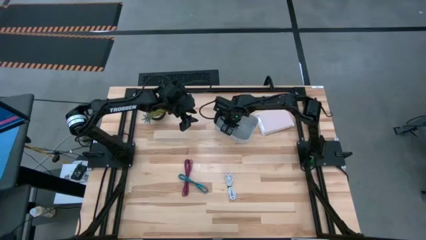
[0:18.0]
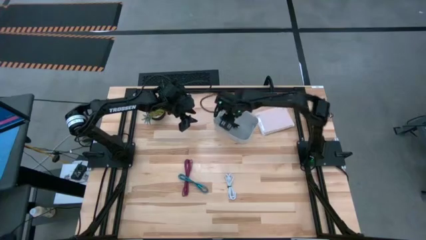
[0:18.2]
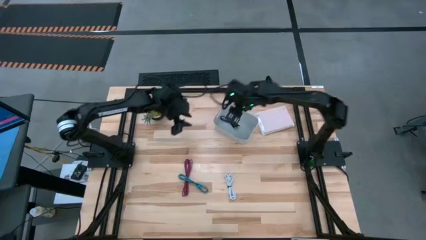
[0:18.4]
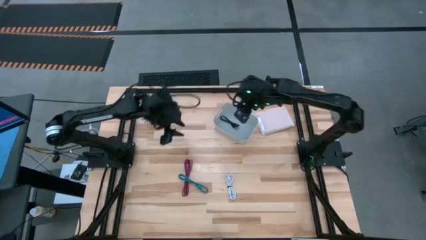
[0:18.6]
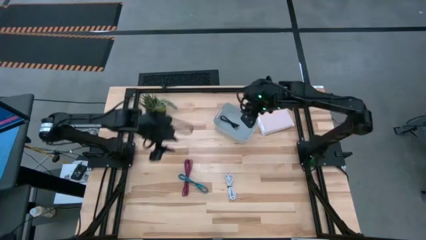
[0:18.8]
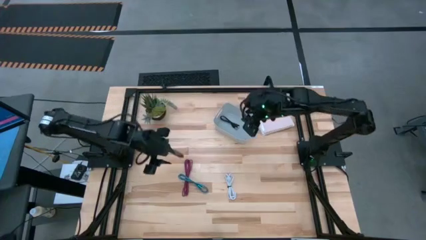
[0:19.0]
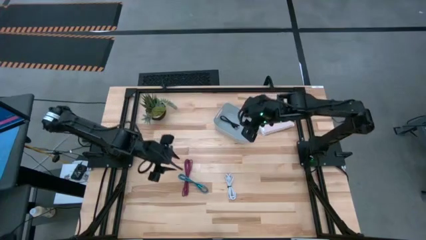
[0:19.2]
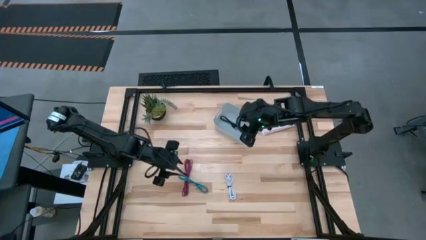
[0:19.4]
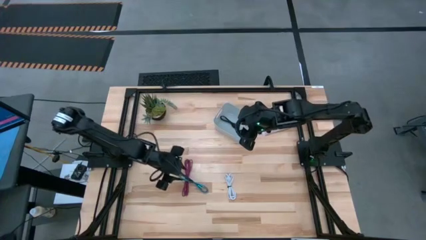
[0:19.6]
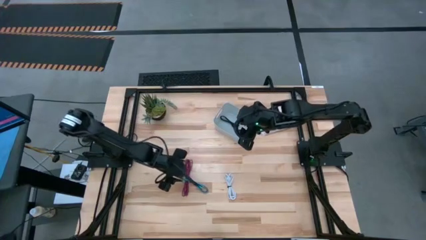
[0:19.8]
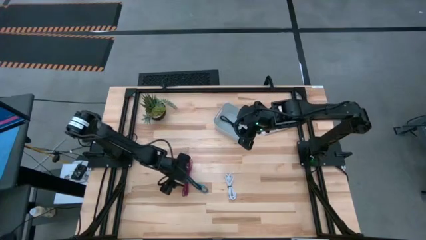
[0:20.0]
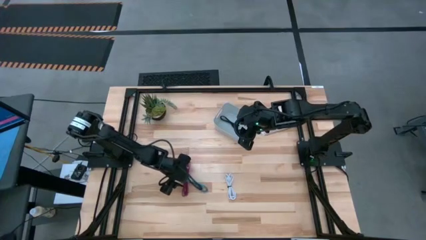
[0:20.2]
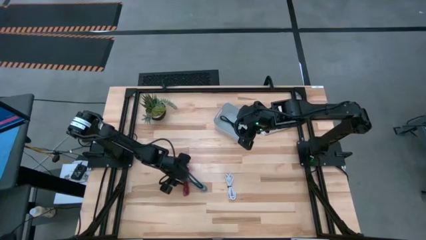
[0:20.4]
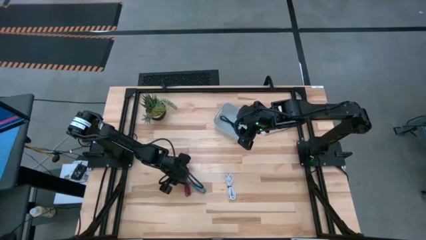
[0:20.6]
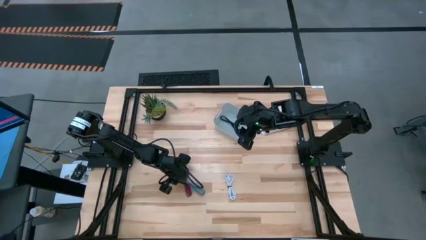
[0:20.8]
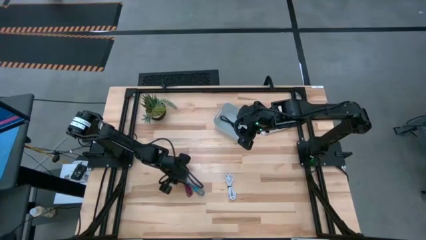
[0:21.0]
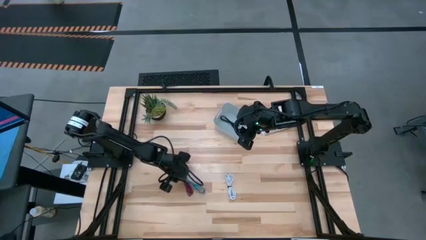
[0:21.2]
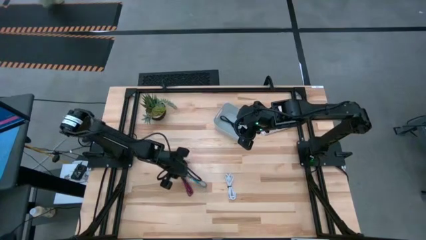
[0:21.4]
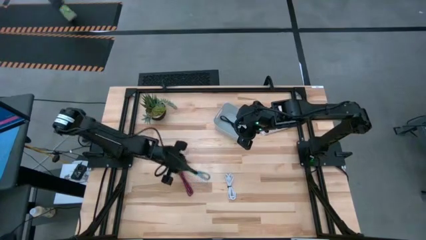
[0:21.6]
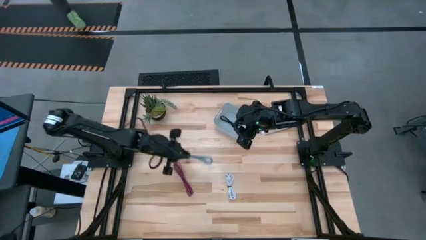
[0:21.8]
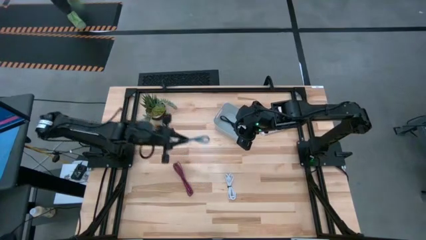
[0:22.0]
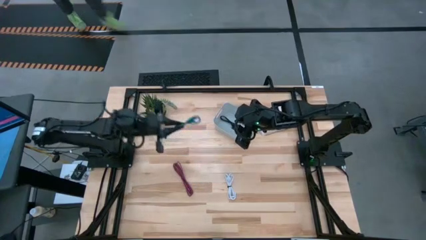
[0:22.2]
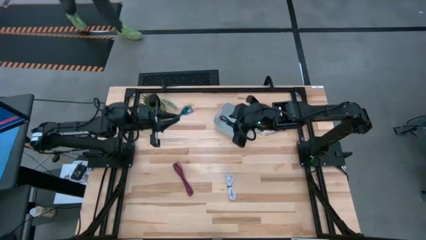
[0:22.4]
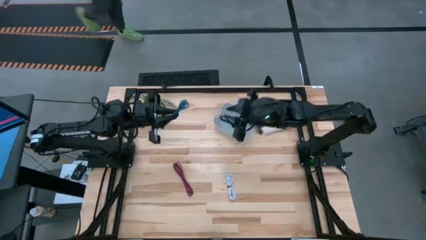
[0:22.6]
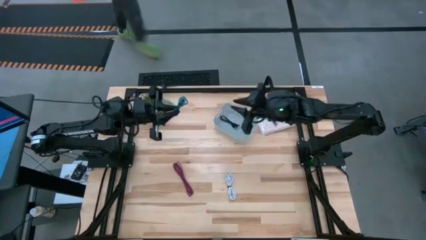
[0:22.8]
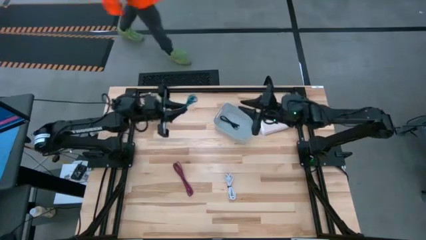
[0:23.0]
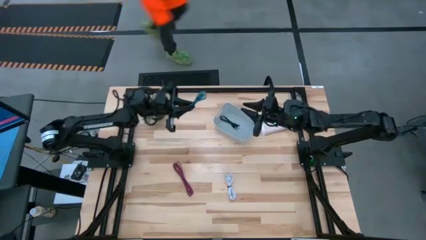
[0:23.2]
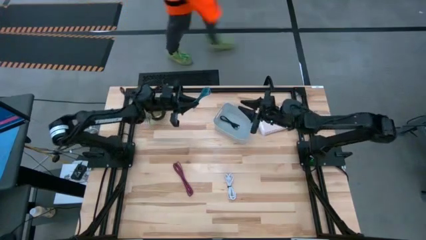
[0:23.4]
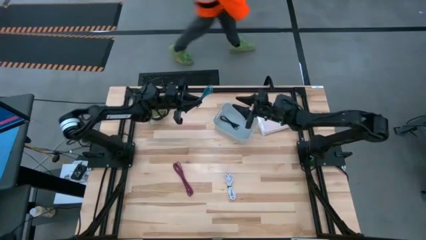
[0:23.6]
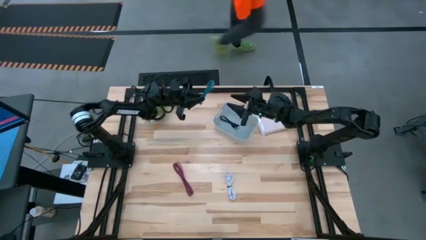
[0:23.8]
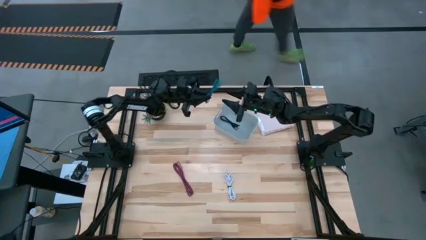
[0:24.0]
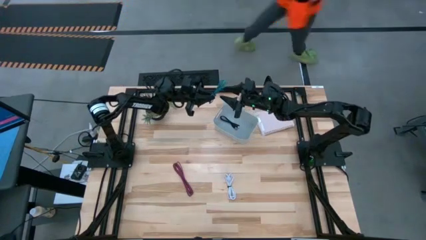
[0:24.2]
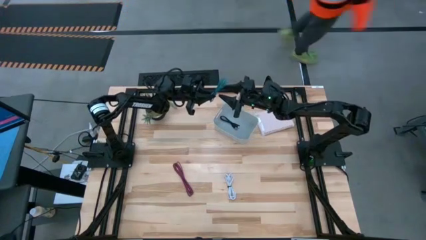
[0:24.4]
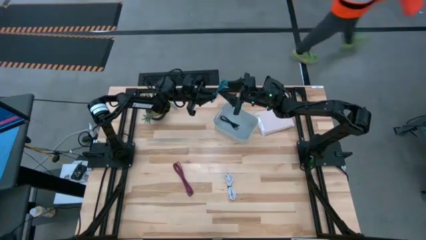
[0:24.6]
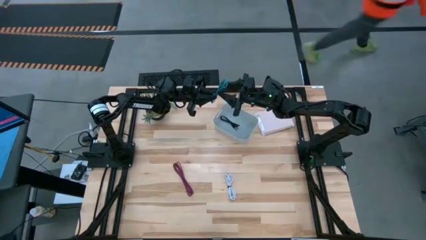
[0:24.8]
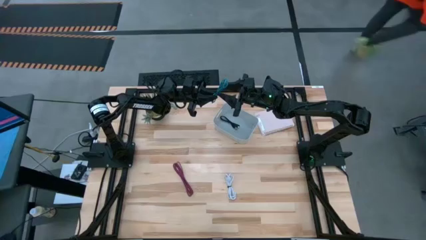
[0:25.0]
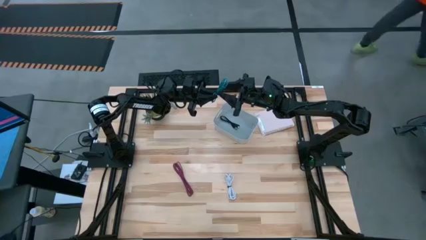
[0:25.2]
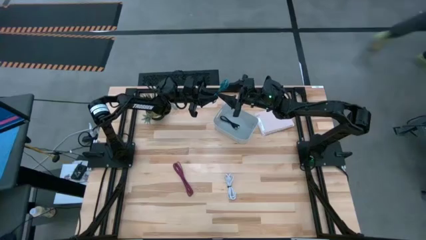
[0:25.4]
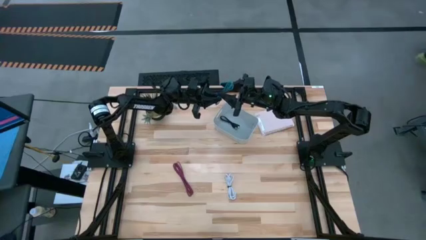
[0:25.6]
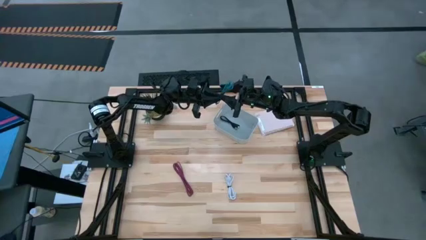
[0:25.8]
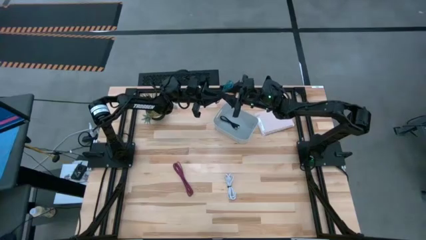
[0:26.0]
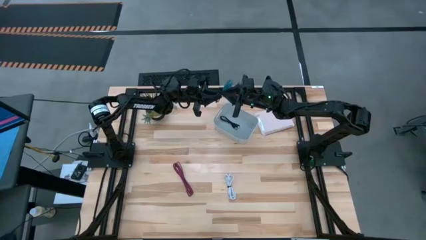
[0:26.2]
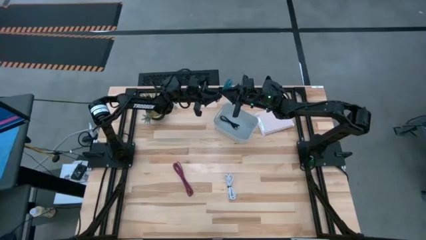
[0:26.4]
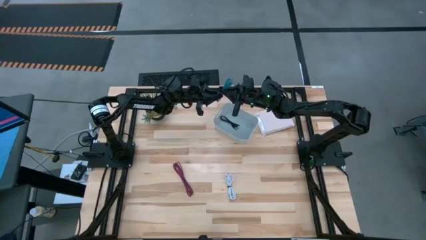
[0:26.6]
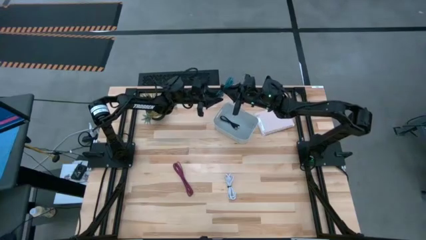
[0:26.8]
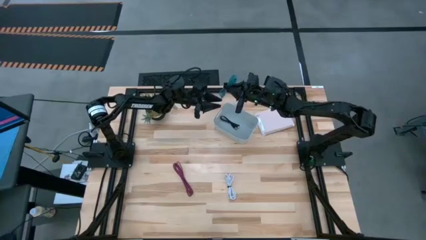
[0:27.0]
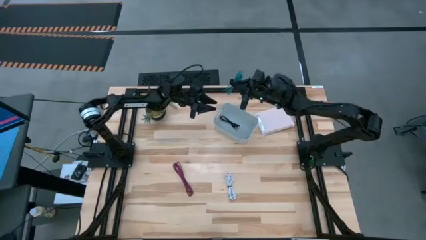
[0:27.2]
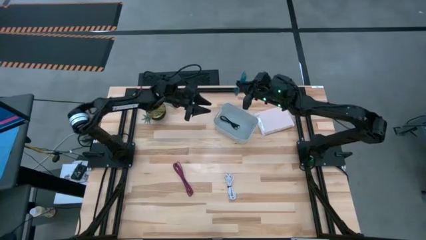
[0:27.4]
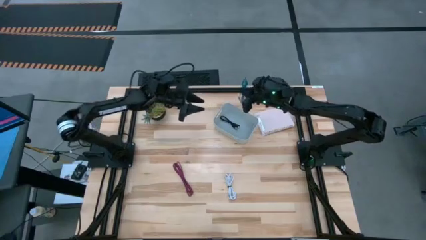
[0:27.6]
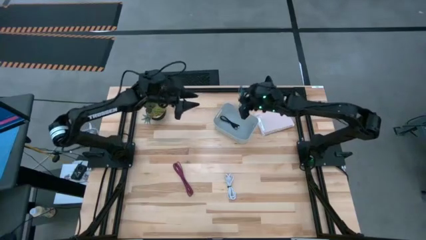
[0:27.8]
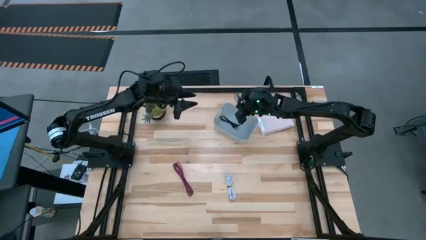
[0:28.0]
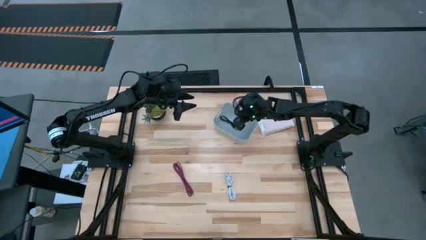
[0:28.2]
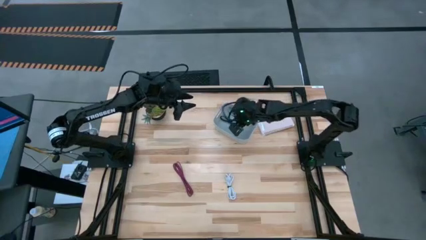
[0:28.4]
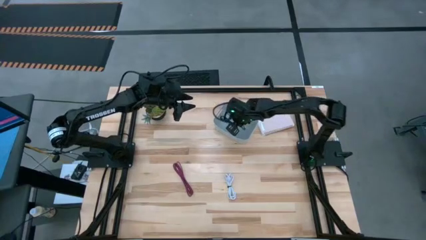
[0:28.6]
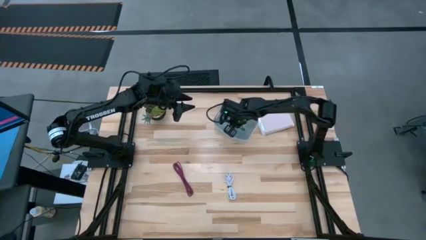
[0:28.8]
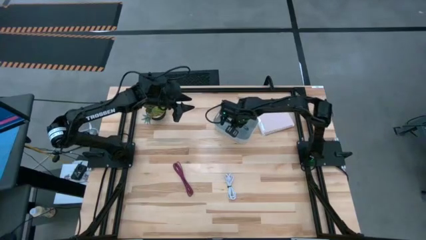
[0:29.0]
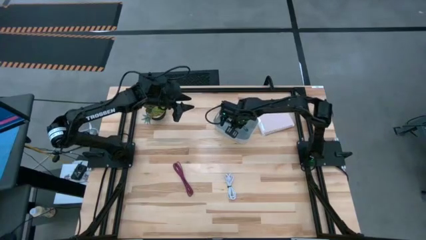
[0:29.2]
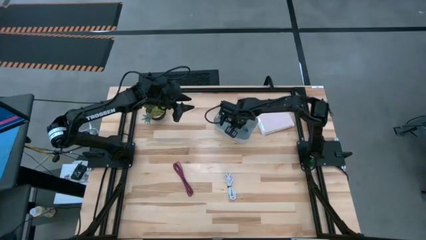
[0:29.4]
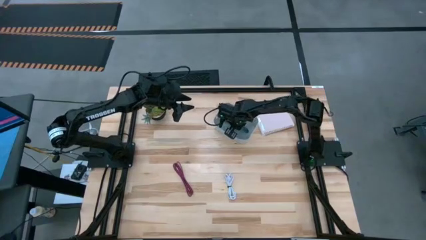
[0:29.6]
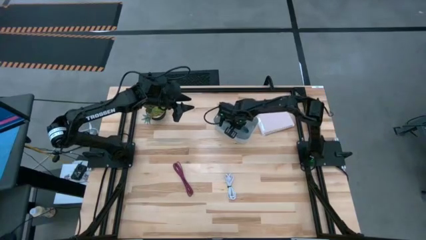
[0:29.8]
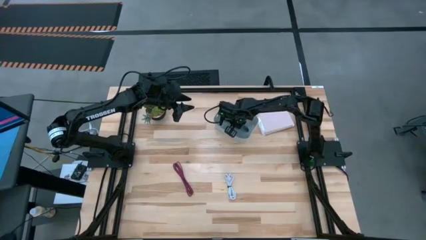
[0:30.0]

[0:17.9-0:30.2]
Task: Pick and place USB-C Cables
Put the blue black USB cable into the grey bin
